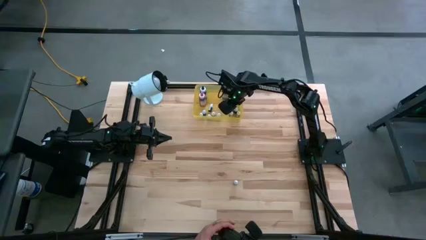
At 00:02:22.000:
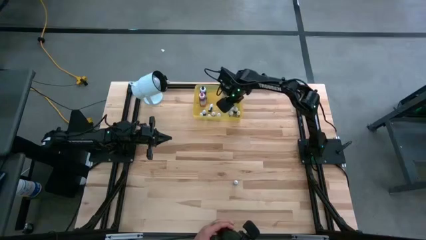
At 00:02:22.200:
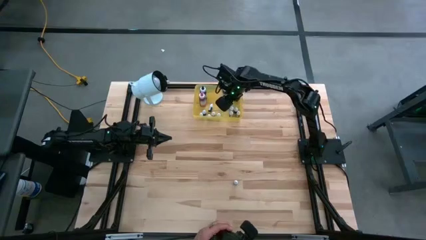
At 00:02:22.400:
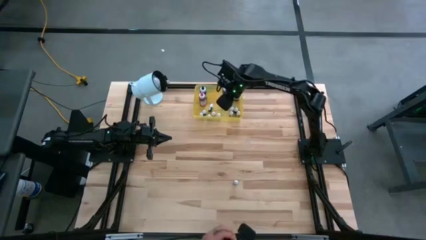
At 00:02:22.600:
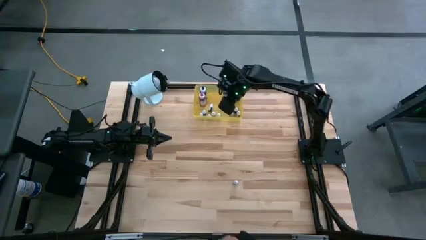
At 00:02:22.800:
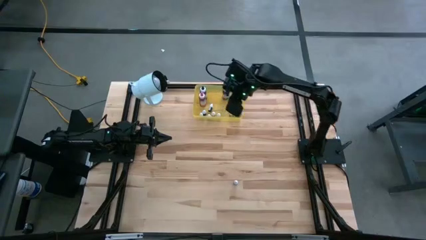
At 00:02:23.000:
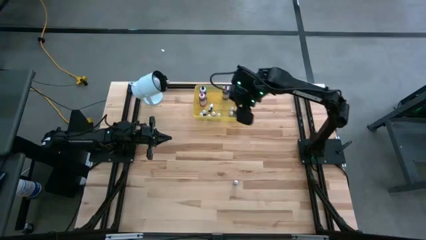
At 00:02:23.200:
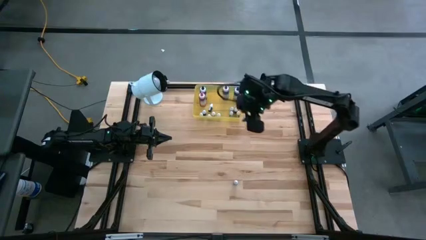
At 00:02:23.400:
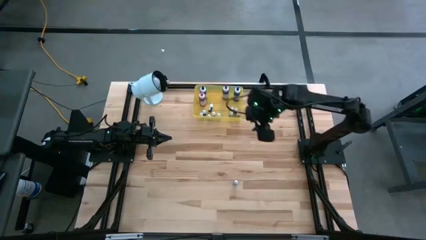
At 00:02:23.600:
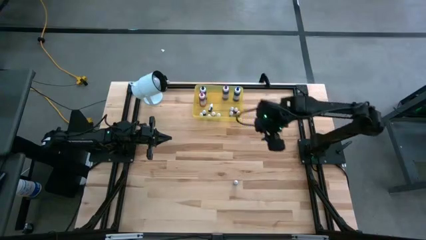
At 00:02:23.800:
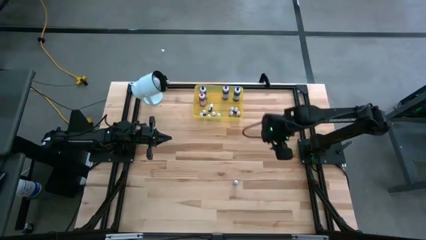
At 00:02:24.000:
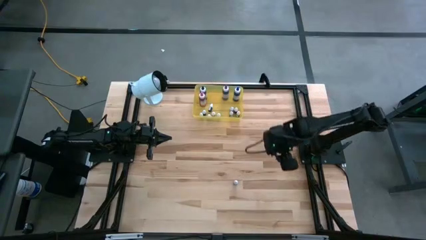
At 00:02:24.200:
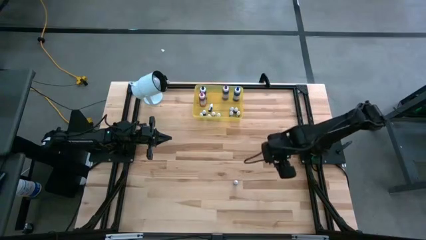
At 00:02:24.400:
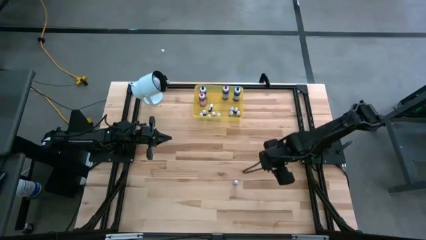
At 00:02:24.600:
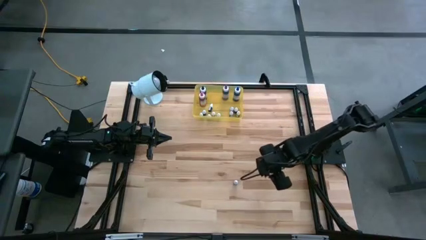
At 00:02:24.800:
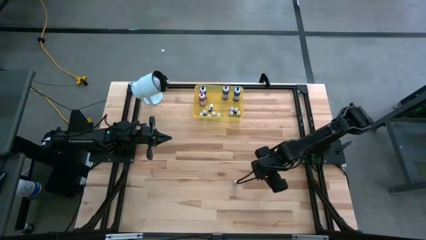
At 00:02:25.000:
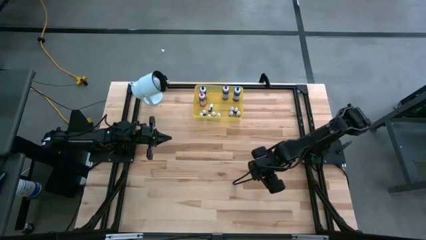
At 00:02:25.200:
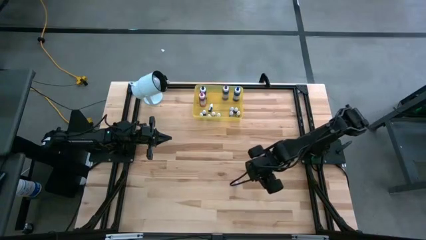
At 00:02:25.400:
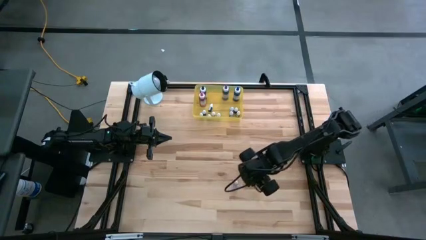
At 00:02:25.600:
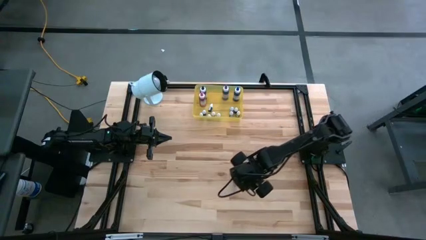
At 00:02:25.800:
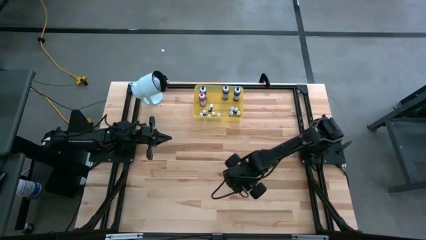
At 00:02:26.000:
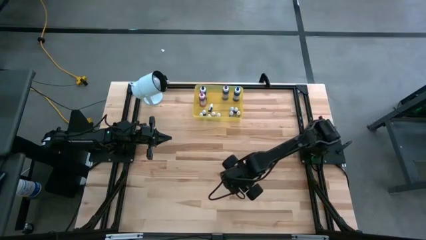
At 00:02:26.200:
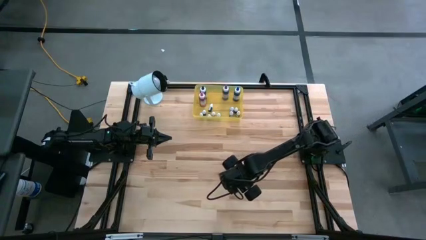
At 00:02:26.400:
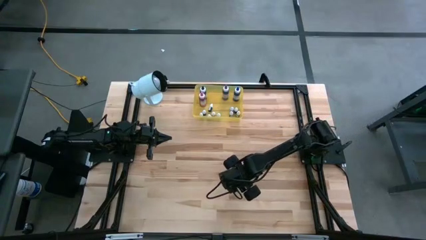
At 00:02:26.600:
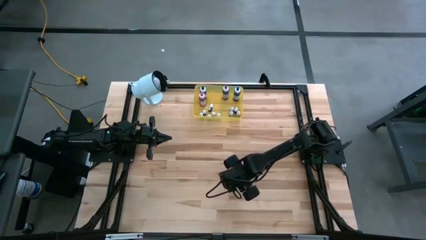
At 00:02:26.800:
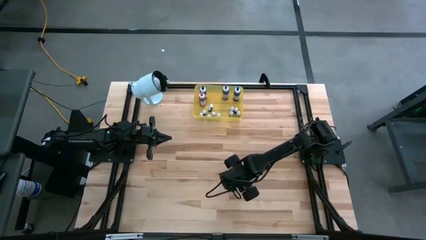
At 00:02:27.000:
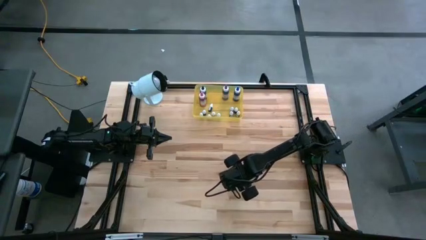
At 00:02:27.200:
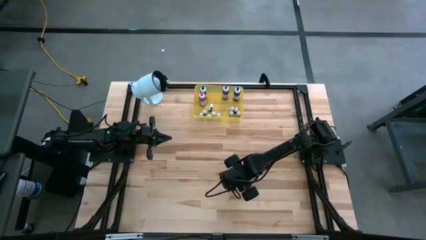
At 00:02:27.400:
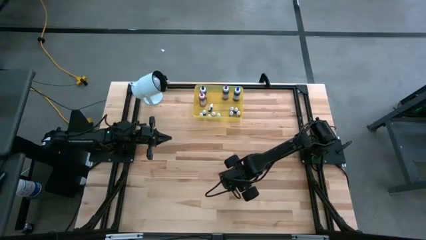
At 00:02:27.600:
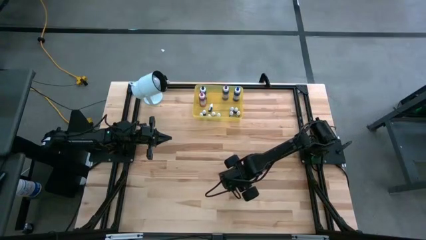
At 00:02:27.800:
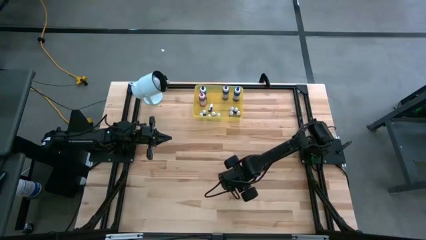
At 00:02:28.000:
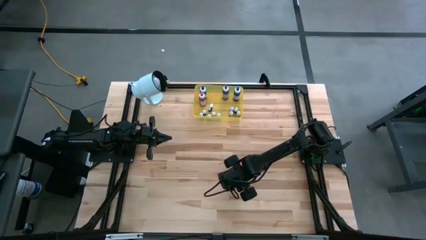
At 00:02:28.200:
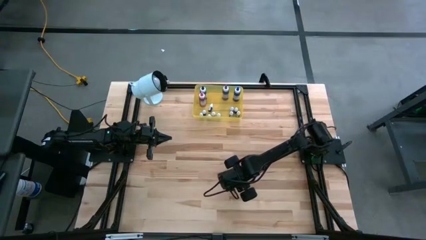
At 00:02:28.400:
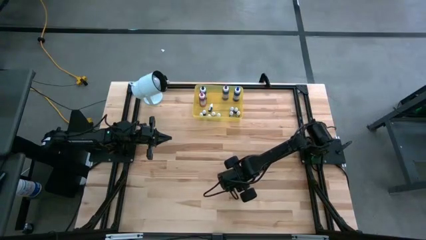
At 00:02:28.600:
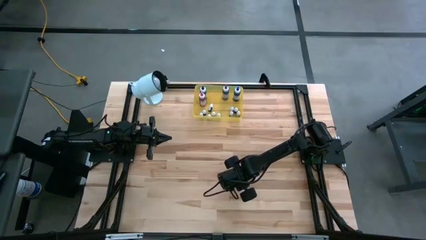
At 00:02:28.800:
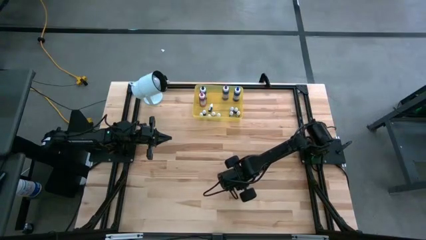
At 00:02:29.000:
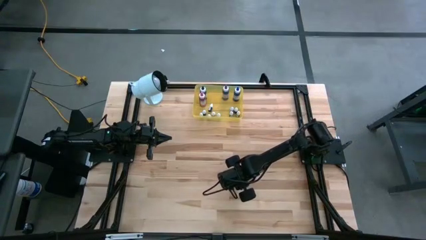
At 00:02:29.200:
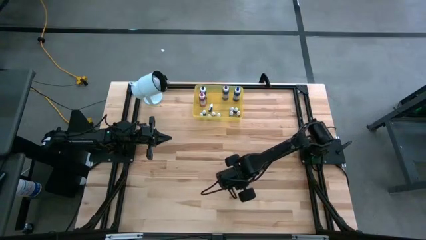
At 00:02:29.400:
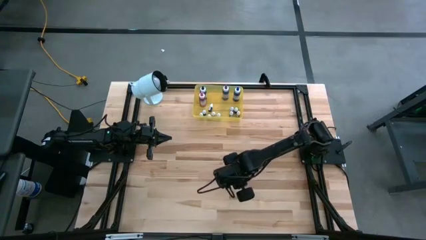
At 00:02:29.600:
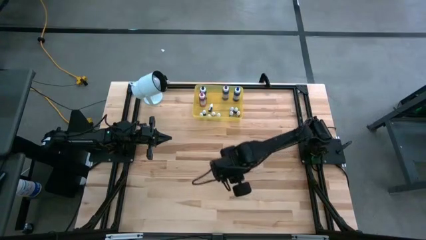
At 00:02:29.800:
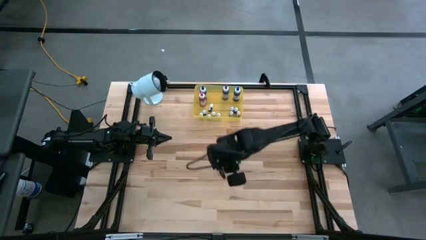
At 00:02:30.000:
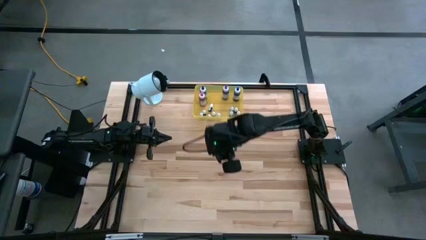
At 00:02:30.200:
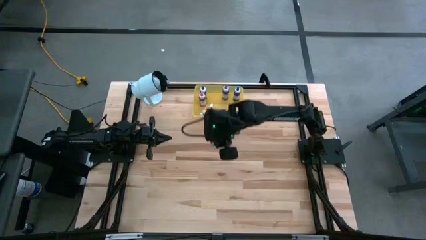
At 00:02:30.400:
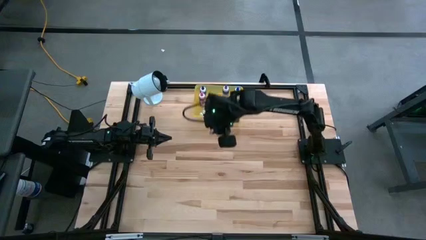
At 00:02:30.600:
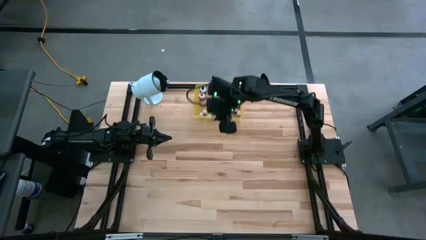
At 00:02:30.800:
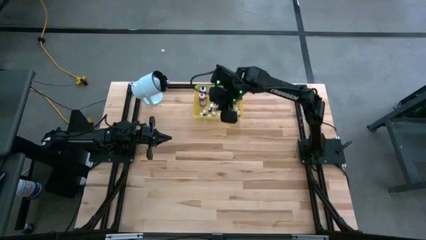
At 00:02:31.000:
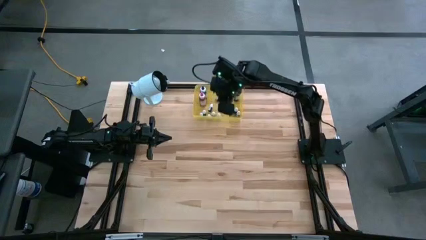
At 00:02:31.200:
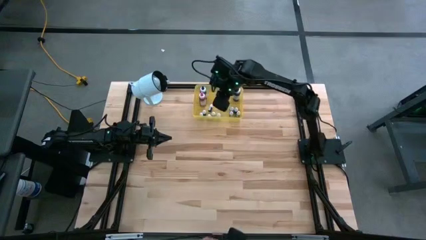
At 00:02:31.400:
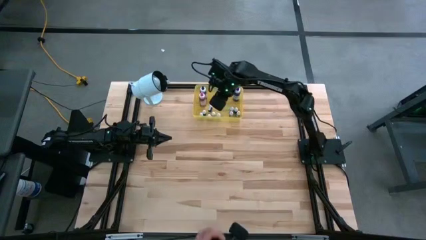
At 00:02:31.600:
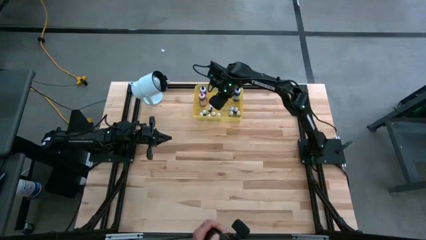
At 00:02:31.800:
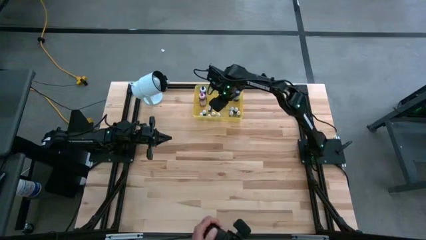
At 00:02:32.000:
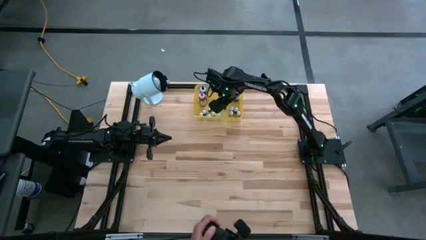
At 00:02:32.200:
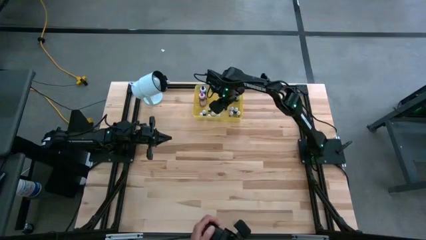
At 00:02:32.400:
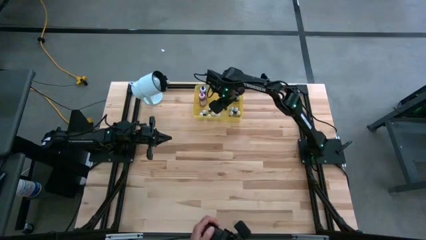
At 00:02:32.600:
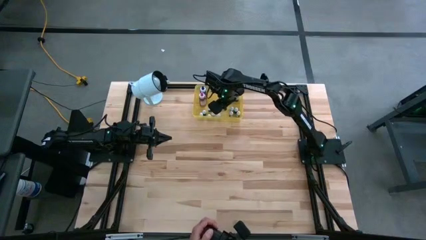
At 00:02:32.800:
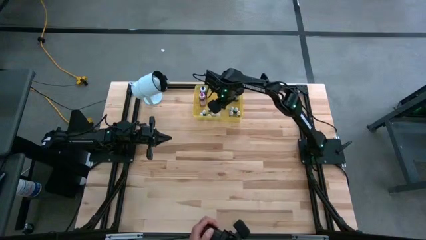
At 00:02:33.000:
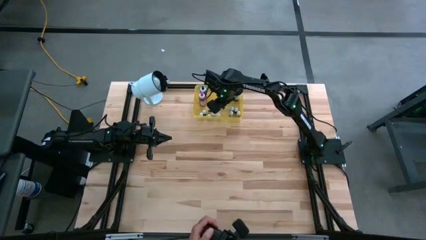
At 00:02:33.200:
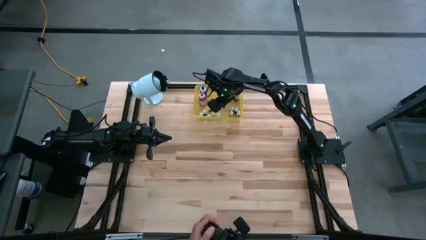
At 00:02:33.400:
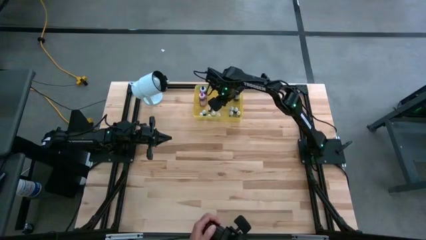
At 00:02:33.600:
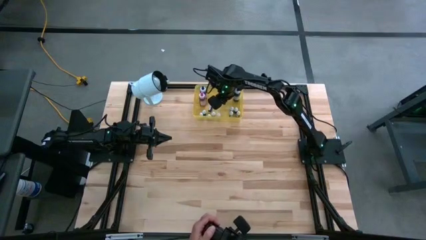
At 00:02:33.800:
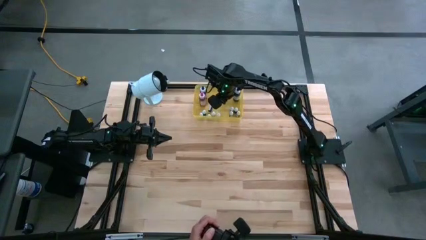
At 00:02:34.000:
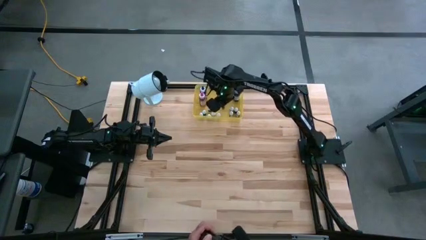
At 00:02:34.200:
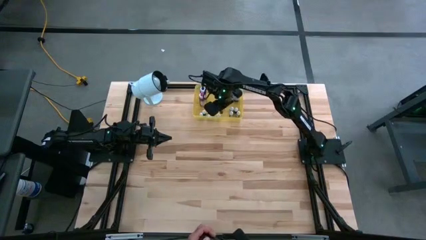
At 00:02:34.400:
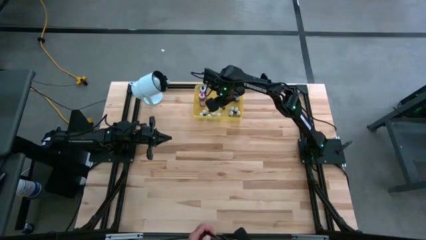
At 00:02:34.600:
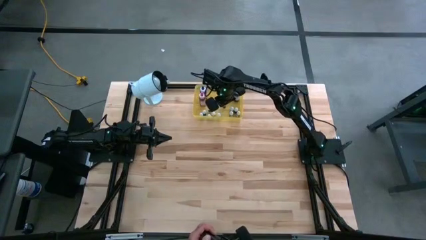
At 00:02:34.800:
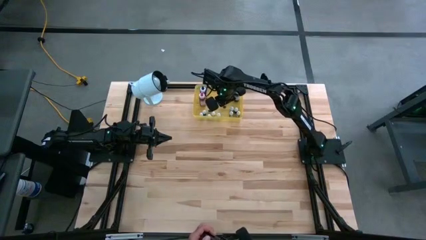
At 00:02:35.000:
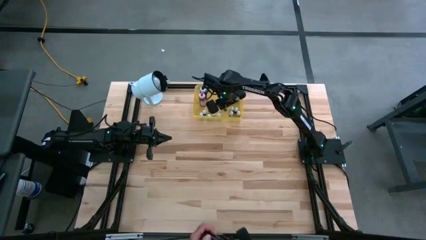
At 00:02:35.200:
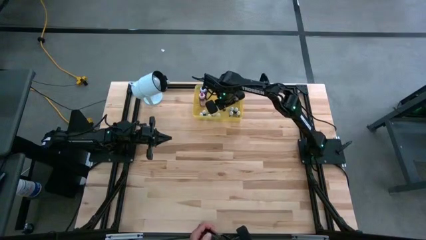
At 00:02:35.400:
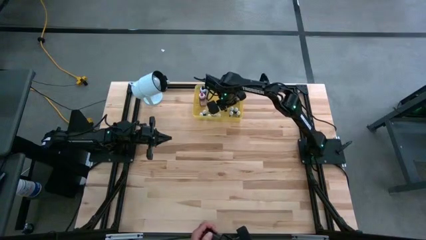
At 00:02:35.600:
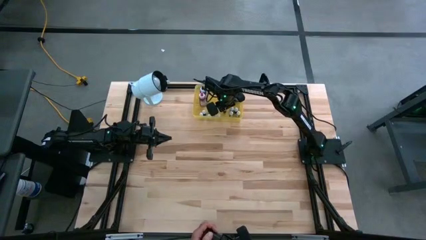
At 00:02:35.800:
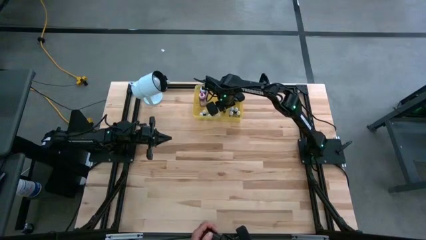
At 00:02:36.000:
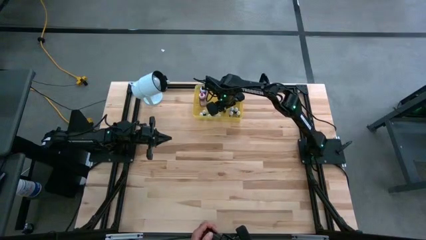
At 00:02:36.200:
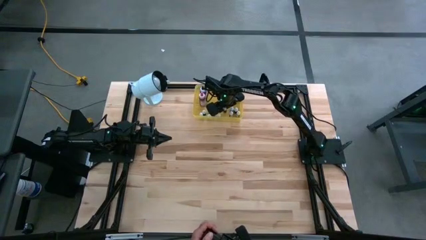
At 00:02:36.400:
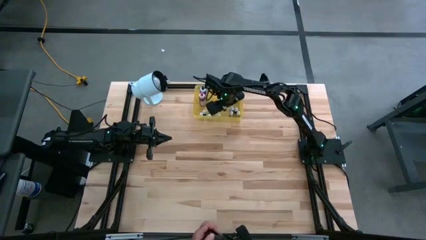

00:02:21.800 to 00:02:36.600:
Task: Pick & Place food coloring
Put the small red food coloring bottle into the yellow container

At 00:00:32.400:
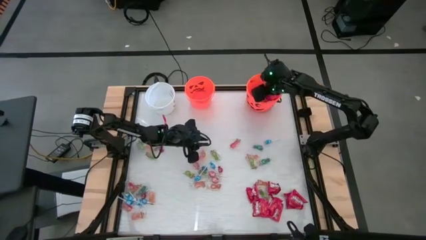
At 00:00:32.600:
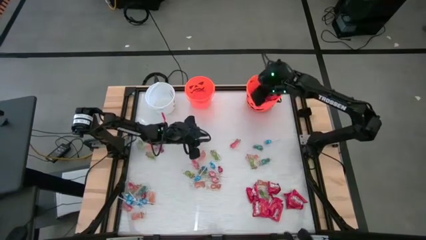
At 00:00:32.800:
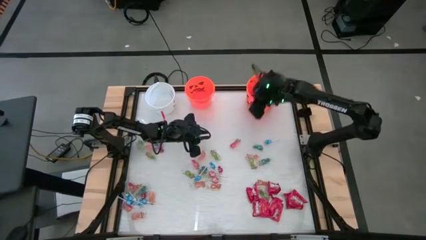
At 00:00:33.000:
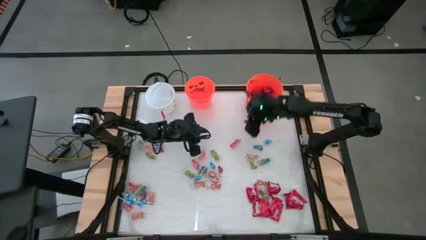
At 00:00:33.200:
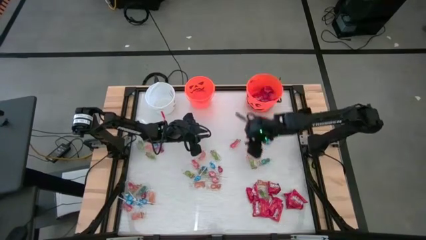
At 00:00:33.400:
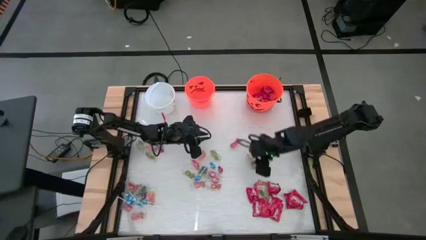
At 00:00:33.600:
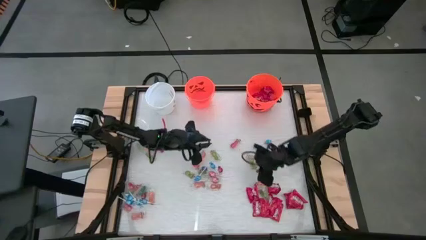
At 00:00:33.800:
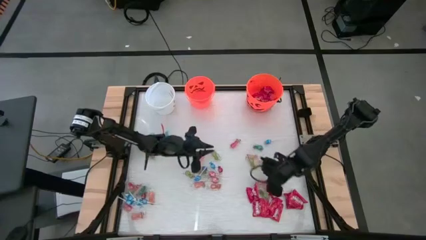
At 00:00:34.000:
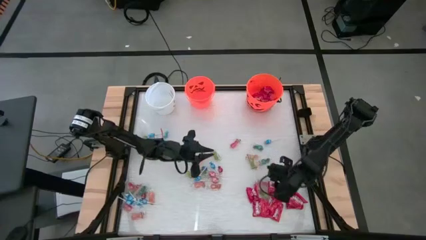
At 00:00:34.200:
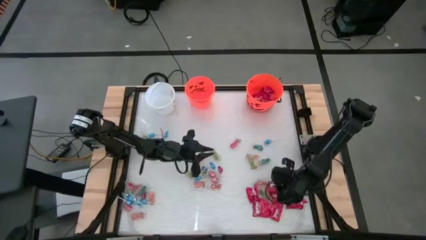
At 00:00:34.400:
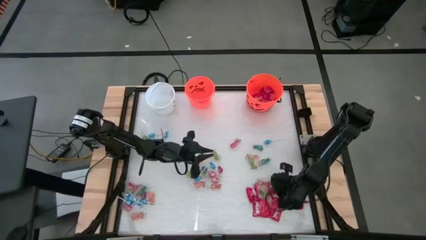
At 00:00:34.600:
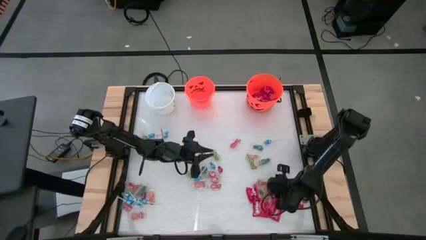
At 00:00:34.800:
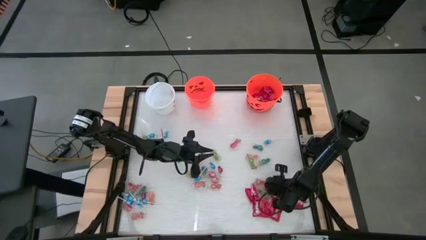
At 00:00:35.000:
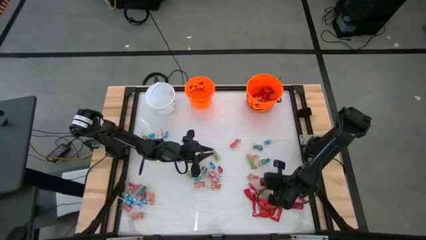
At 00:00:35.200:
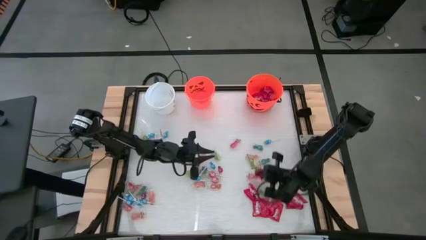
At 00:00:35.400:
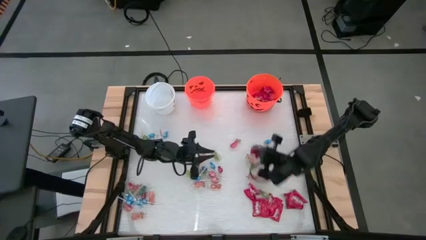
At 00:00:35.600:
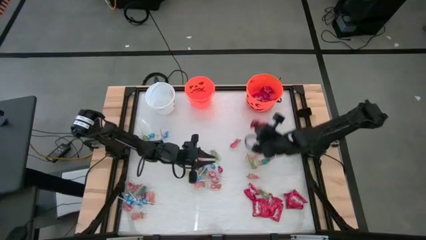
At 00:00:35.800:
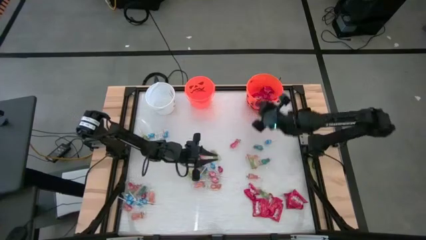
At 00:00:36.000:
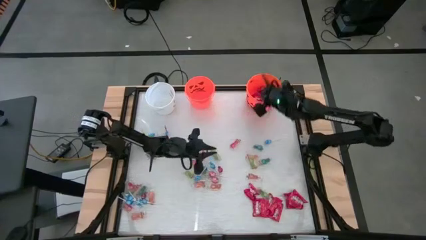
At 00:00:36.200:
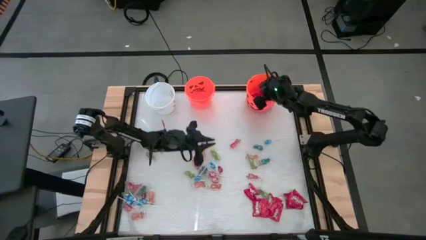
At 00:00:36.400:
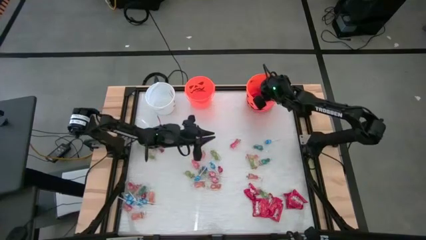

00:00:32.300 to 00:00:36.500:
Task: Sort candy by brand, put in halloween buckets
Put the red candy into the right orange bucket
